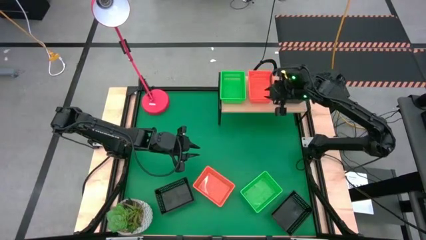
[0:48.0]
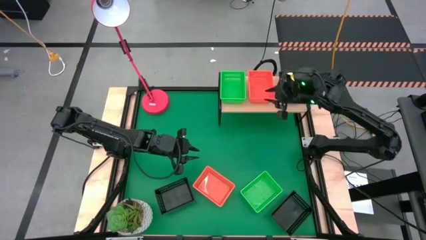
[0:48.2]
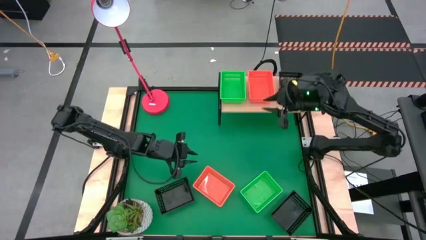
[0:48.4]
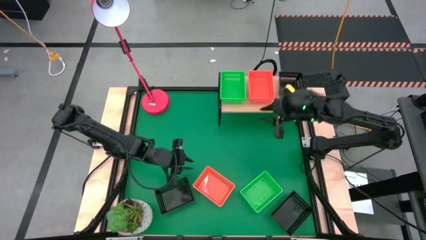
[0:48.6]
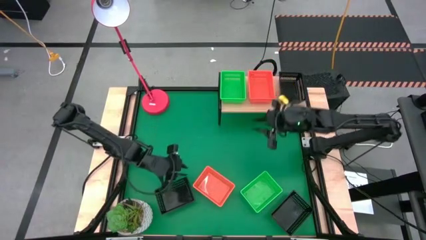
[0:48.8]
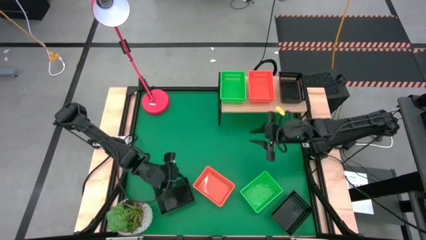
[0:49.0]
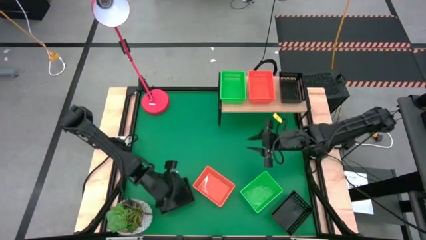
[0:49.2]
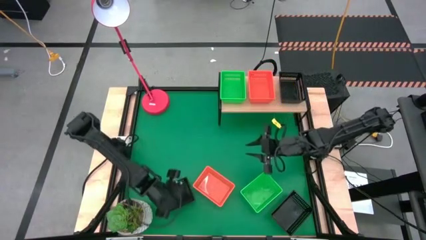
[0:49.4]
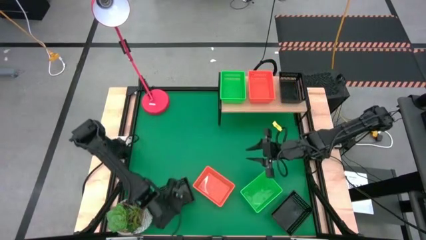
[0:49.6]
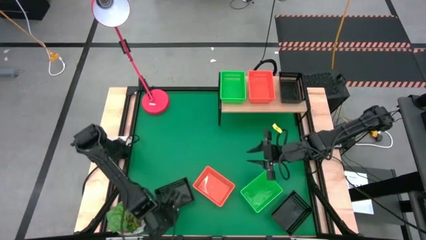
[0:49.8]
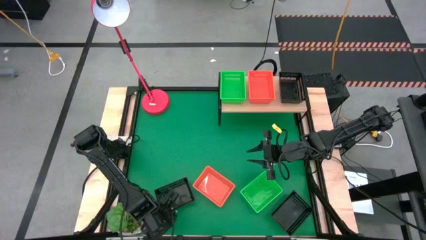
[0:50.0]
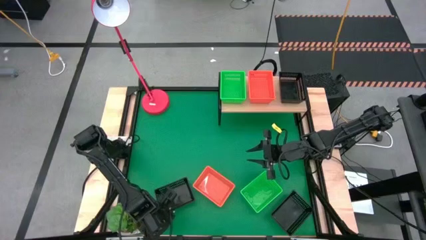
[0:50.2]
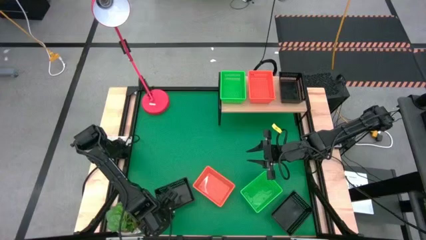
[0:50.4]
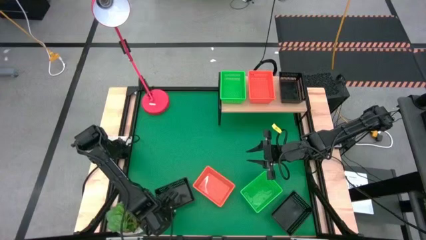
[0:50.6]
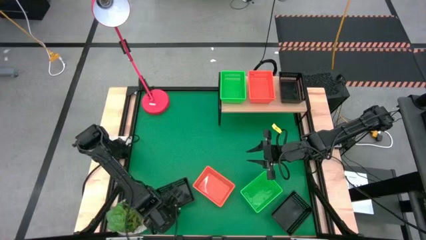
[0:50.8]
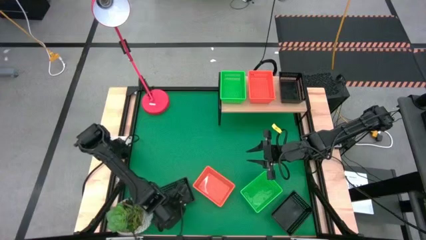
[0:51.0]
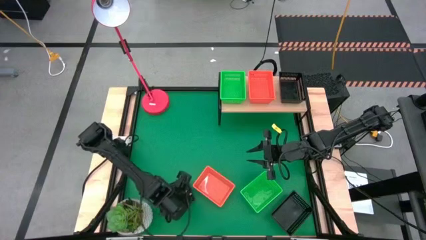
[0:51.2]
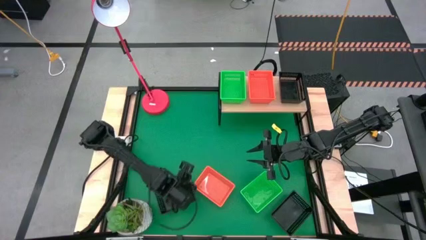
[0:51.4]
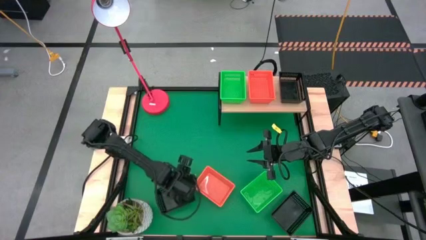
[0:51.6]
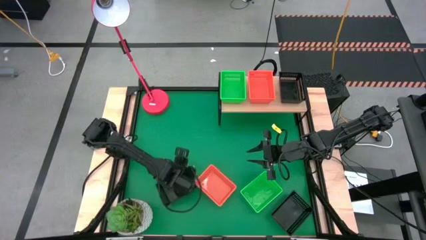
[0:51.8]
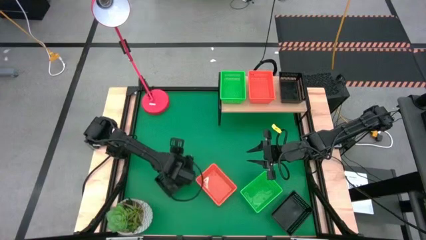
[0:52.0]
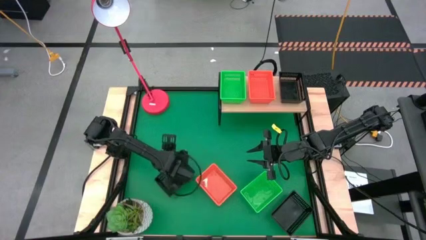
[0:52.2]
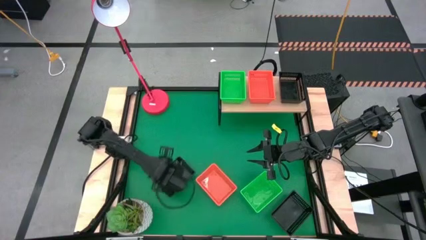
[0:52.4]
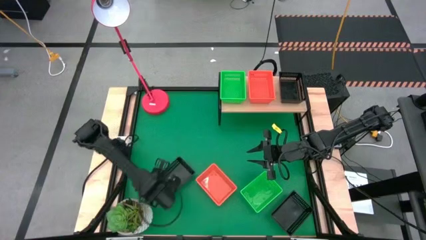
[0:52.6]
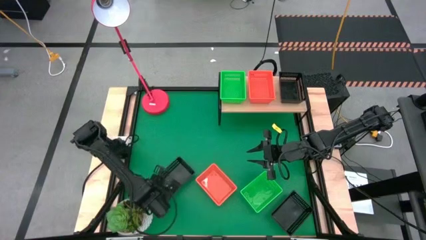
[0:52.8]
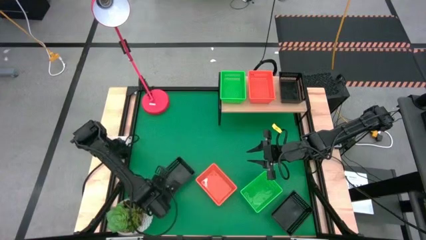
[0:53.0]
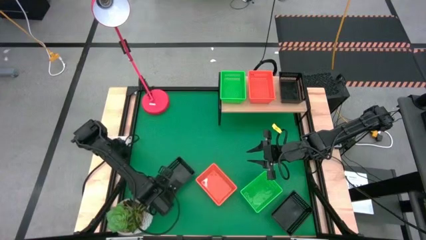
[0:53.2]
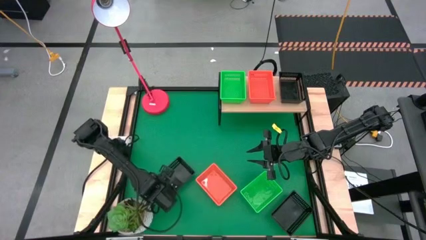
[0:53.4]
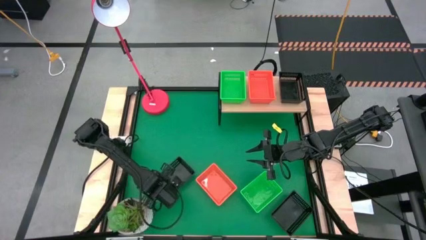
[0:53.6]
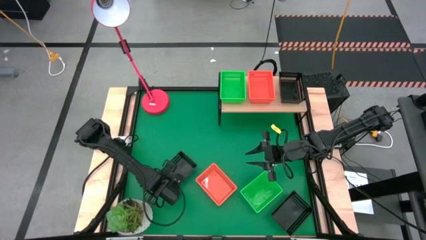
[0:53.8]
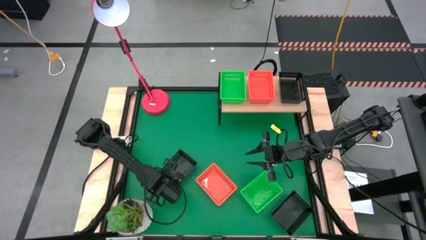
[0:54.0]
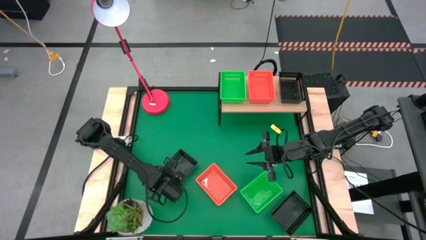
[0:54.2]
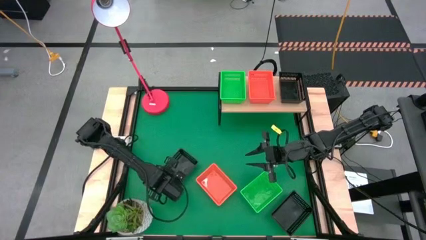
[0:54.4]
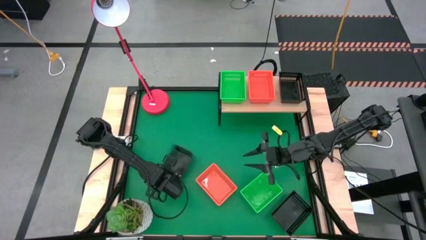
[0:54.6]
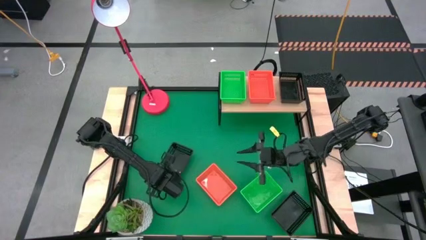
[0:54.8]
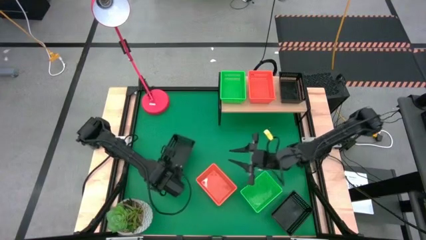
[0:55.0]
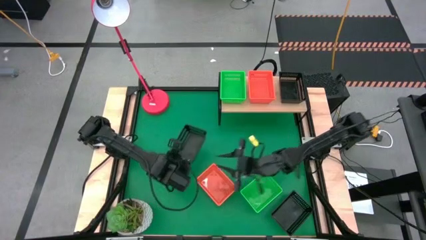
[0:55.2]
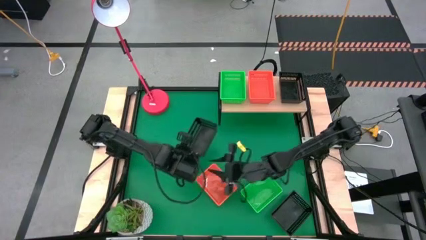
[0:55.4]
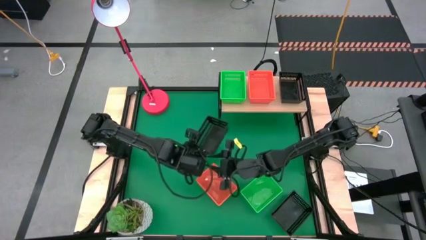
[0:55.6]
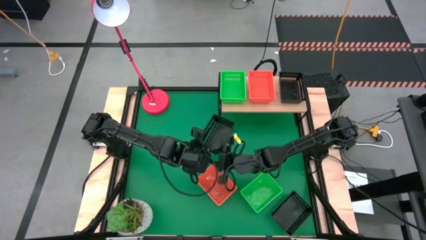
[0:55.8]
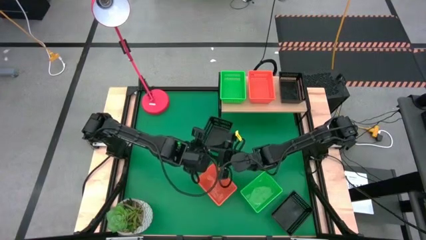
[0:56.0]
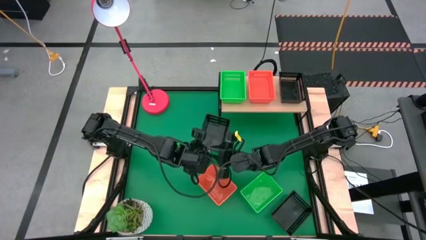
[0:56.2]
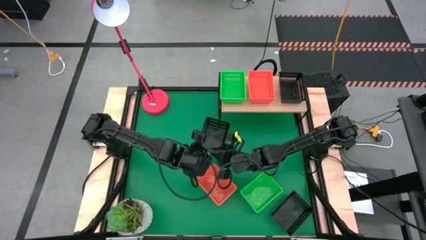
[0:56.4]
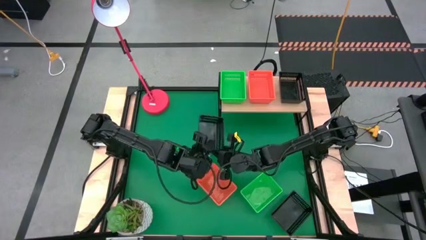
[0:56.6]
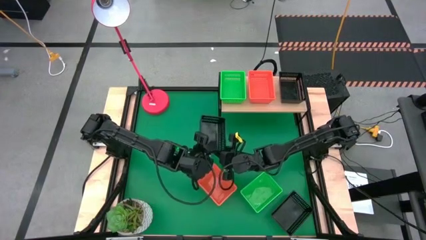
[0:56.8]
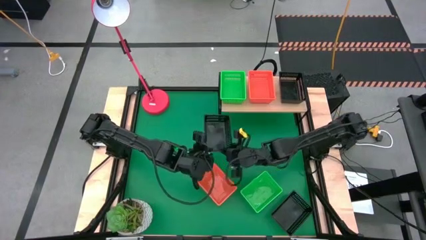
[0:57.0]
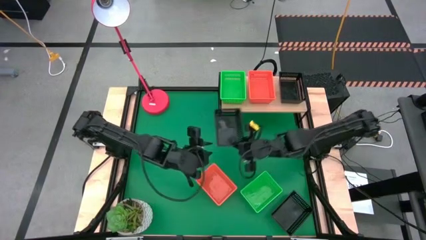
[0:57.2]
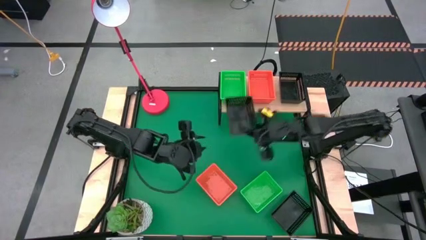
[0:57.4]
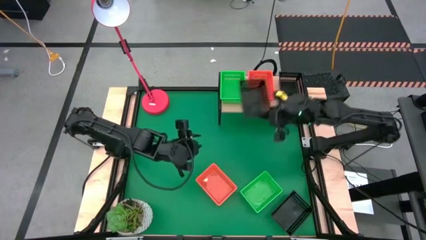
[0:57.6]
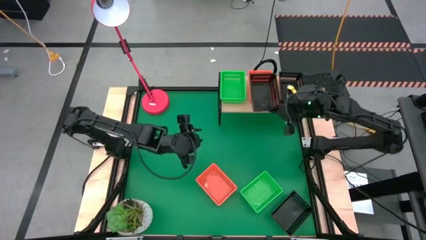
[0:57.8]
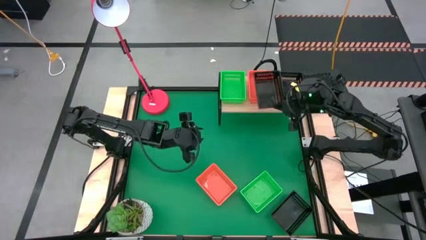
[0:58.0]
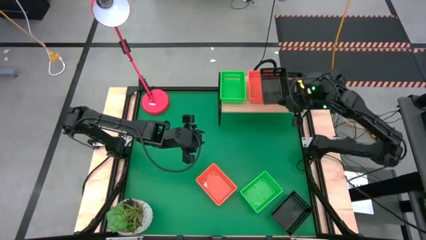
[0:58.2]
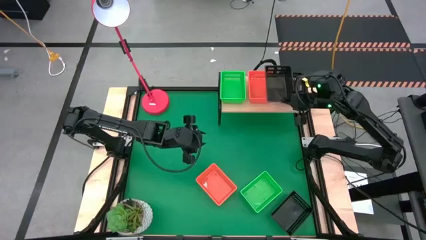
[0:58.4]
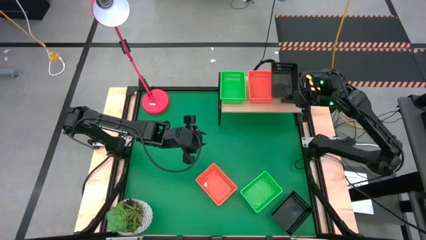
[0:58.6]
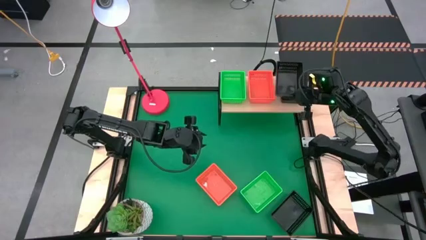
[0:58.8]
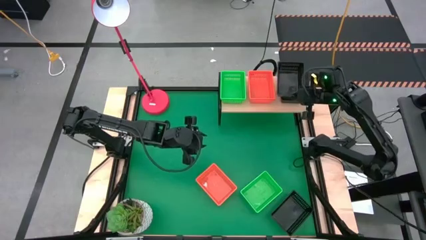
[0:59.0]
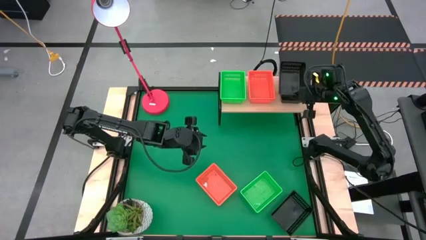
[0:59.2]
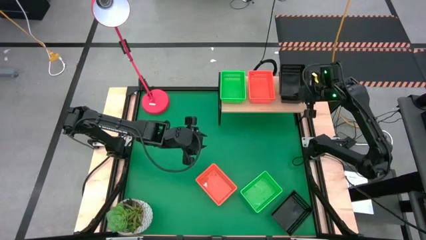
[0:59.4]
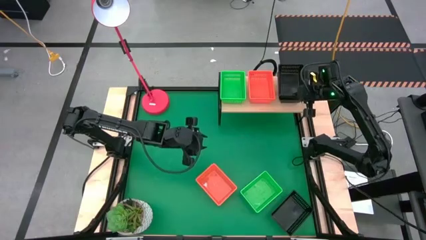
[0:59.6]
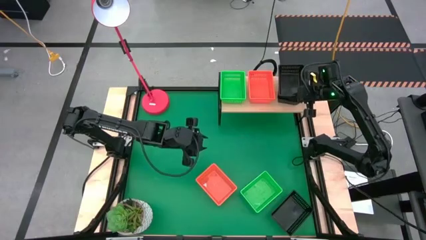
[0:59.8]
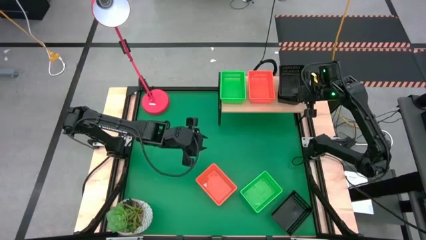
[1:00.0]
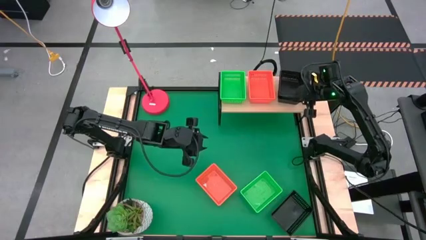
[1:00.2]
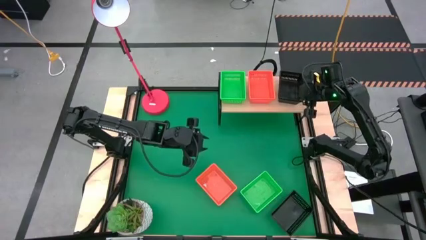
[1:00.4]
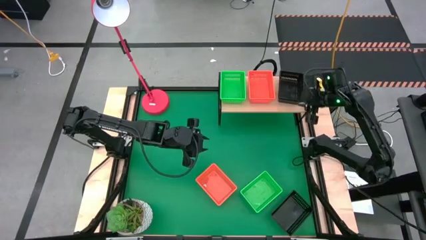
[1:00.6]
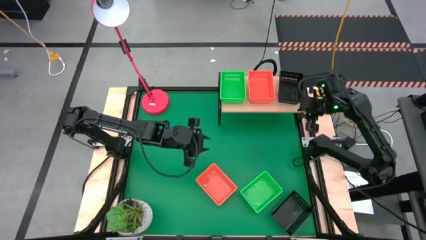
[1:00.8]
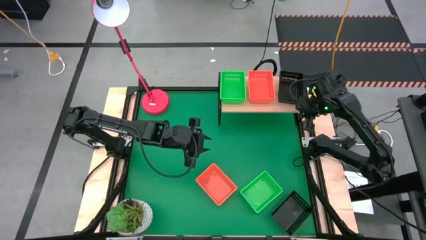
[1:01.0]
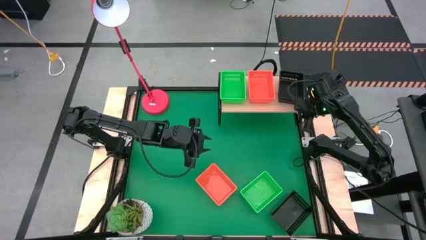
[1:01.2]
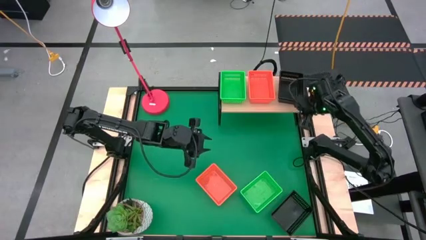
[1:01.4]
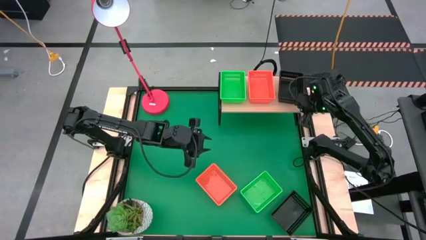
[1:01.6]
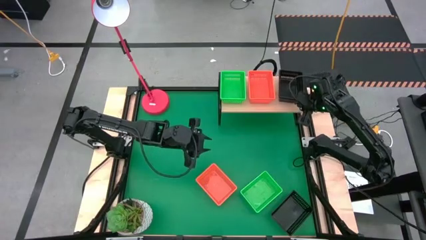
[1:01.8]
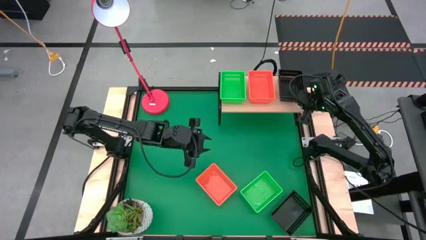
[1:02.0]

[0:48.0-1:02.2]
Task: Stack baskets on shelf by color
Stack the left black basket on top of the black basket on the shelf
